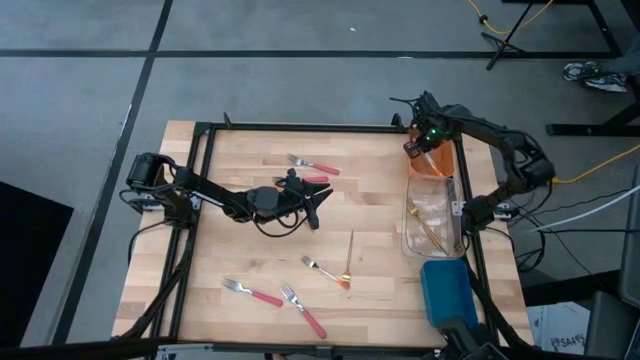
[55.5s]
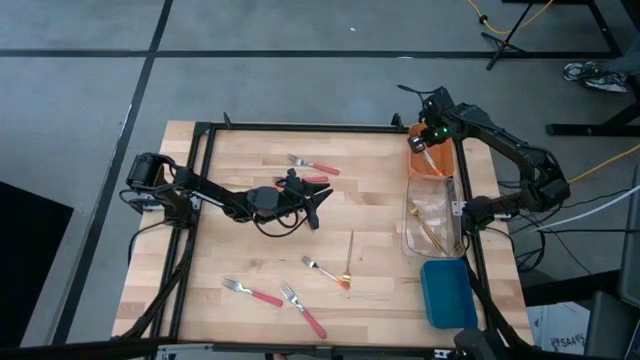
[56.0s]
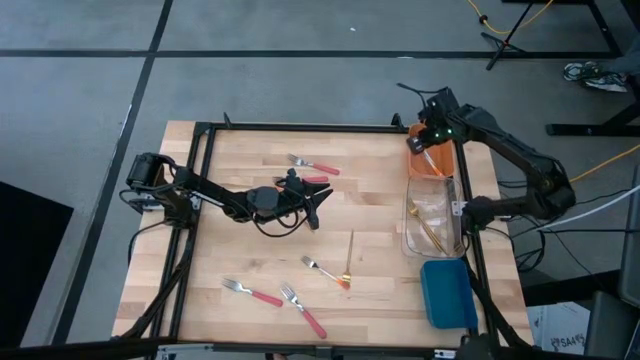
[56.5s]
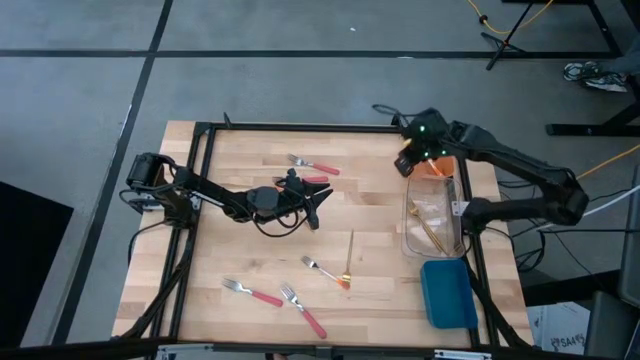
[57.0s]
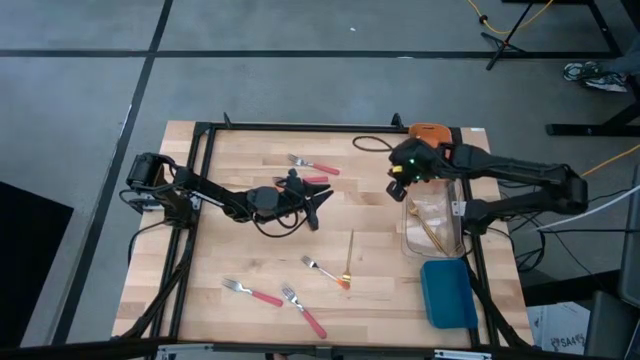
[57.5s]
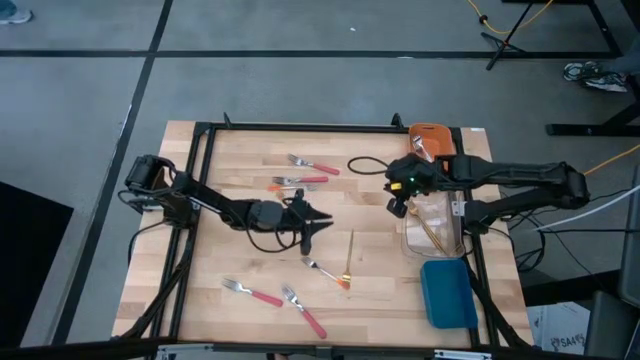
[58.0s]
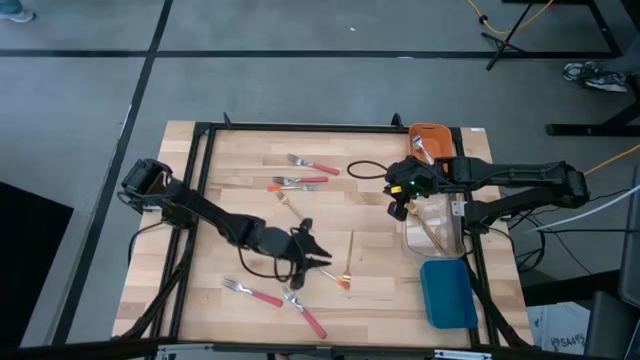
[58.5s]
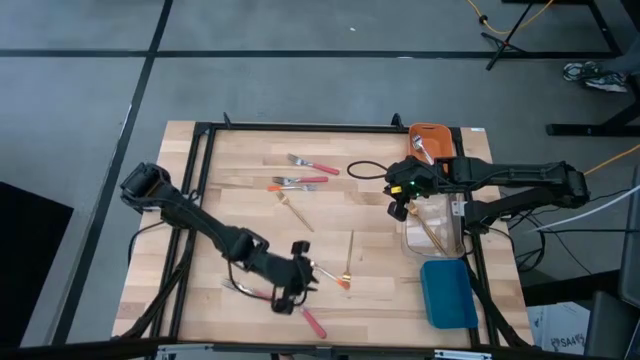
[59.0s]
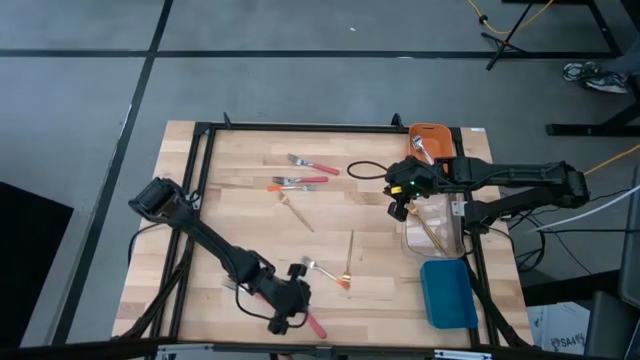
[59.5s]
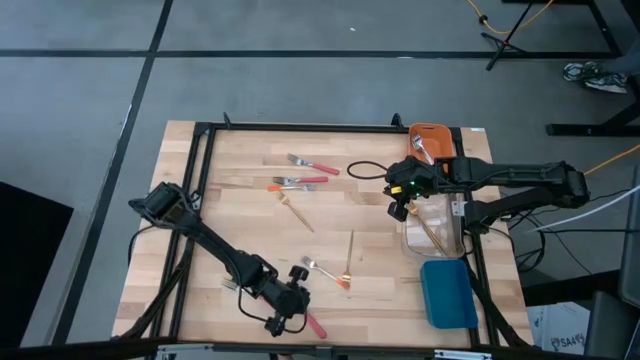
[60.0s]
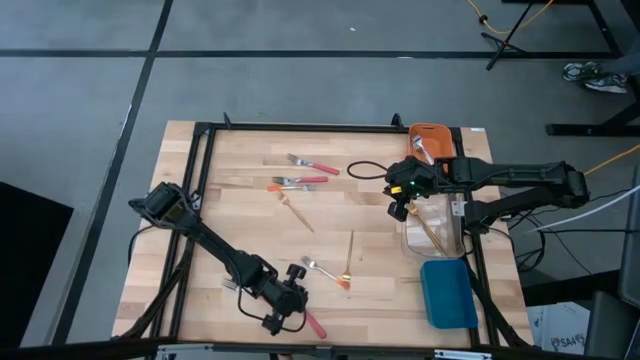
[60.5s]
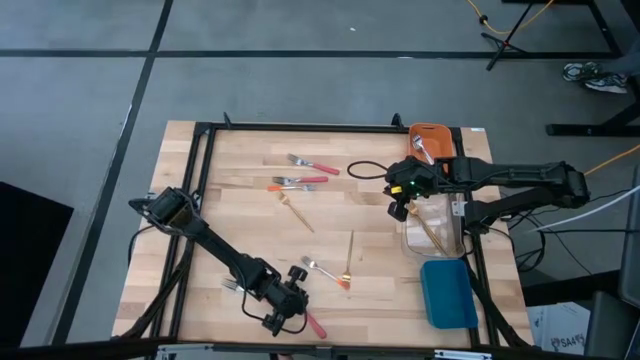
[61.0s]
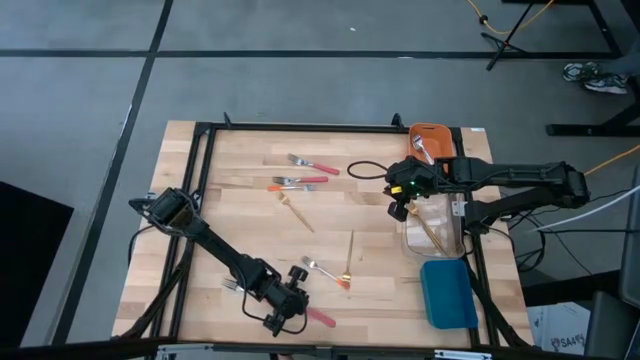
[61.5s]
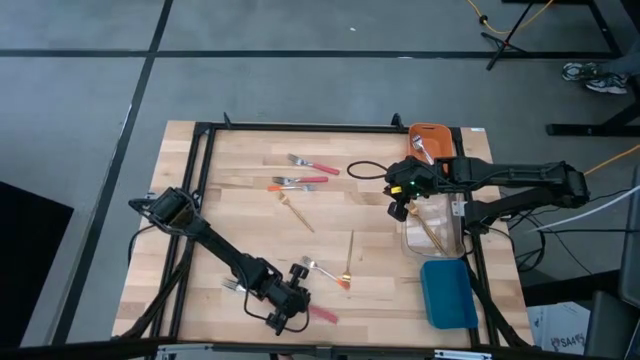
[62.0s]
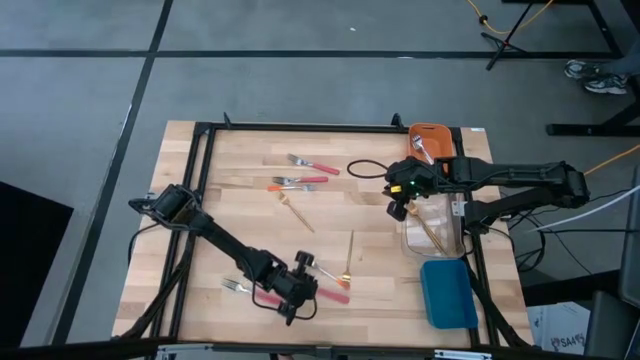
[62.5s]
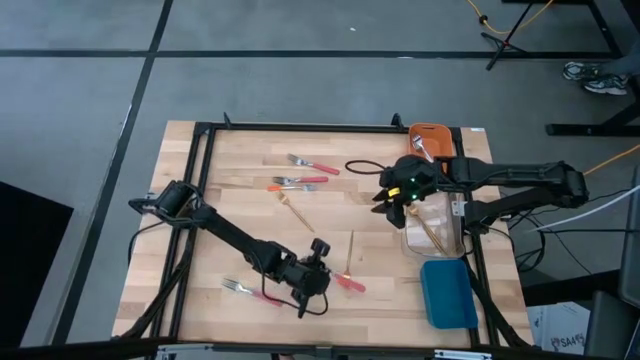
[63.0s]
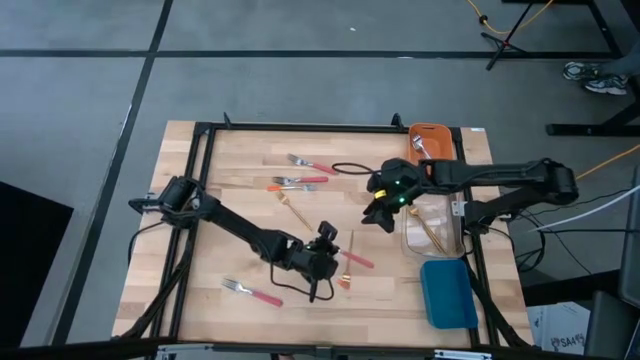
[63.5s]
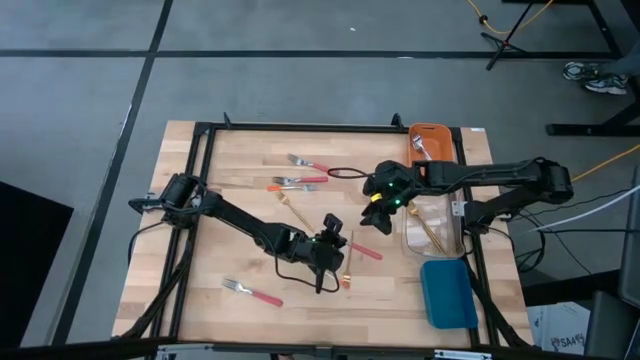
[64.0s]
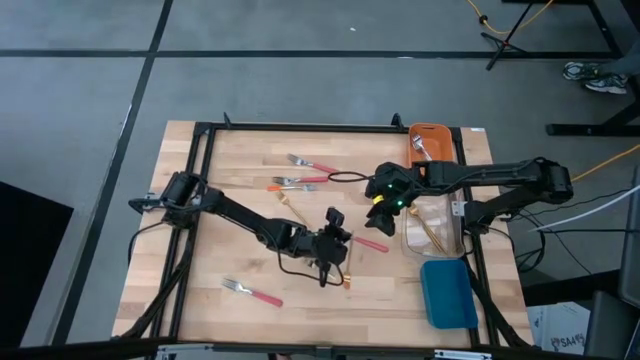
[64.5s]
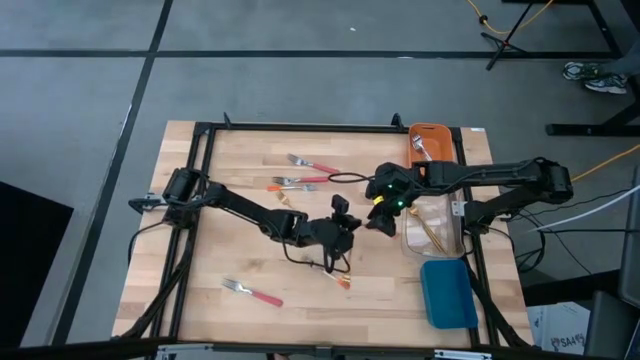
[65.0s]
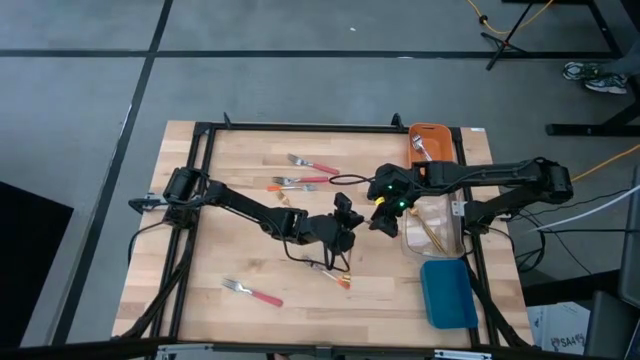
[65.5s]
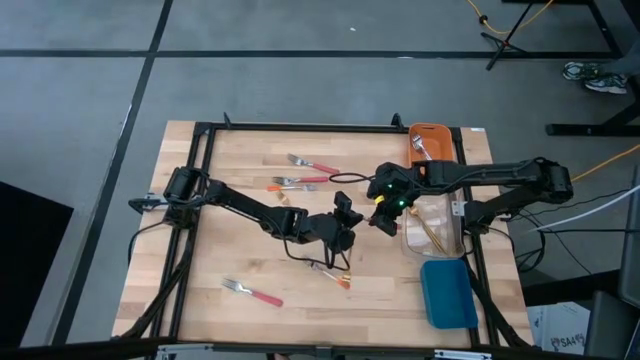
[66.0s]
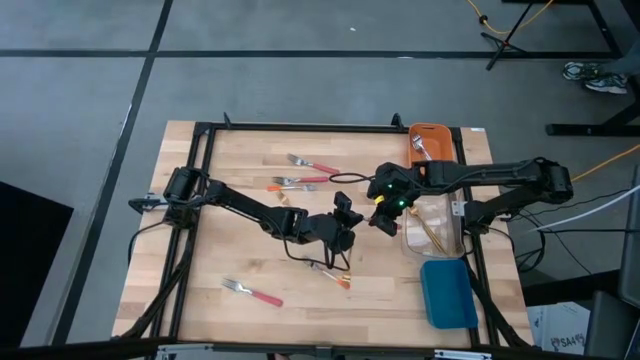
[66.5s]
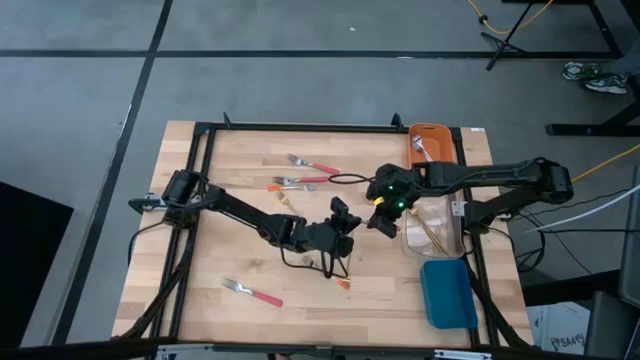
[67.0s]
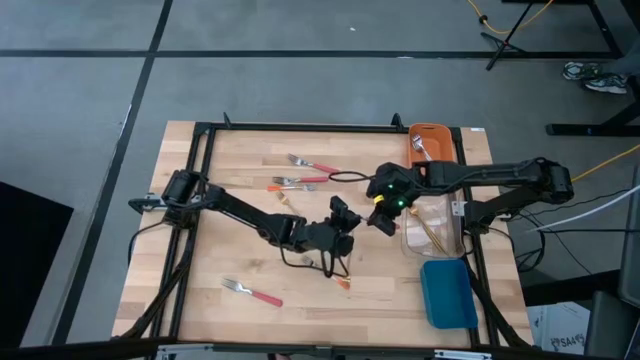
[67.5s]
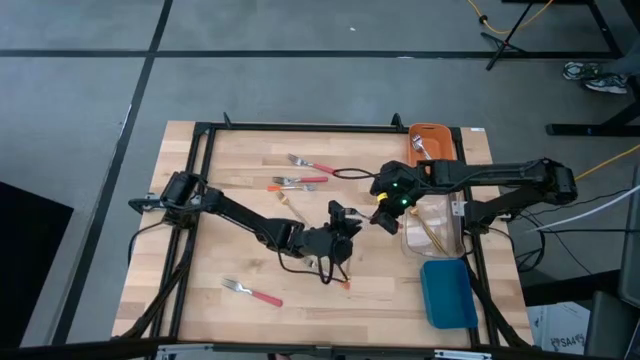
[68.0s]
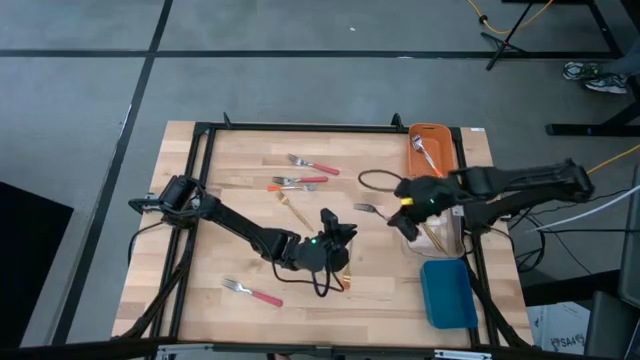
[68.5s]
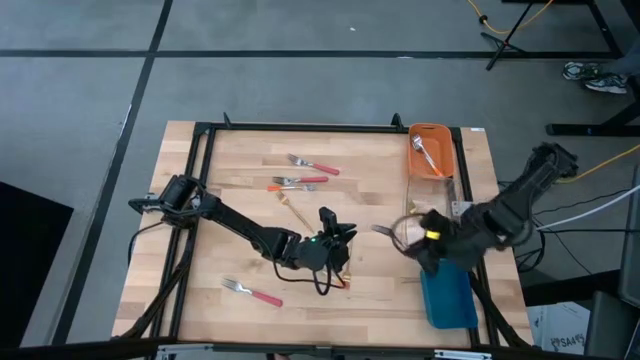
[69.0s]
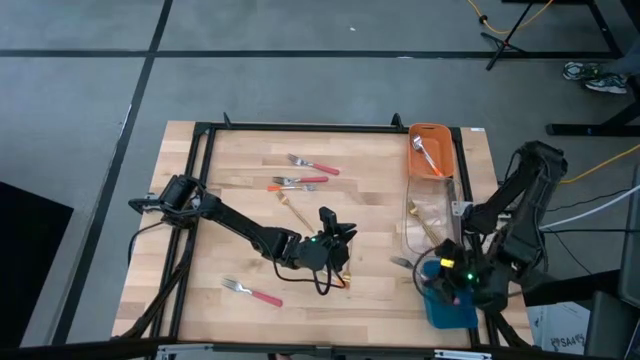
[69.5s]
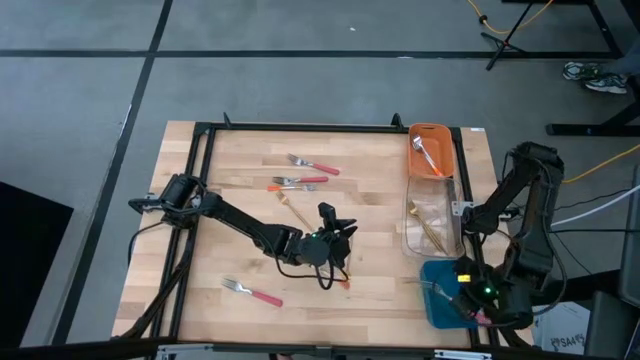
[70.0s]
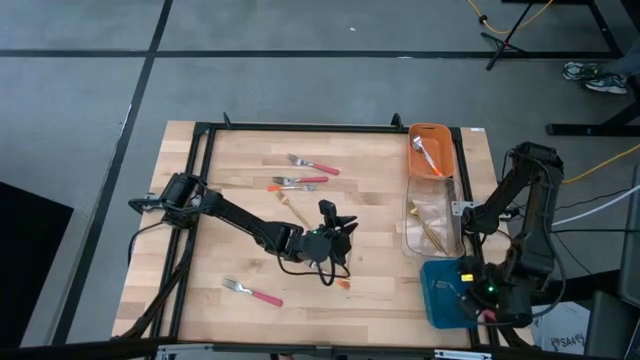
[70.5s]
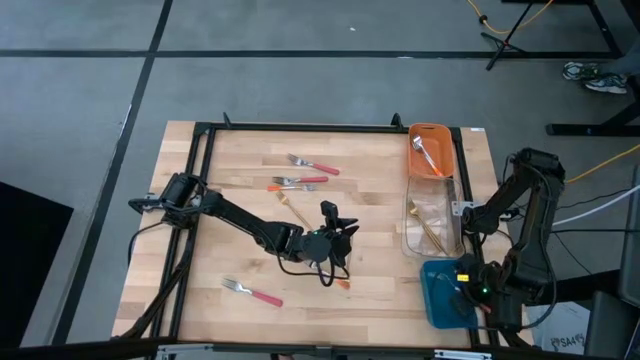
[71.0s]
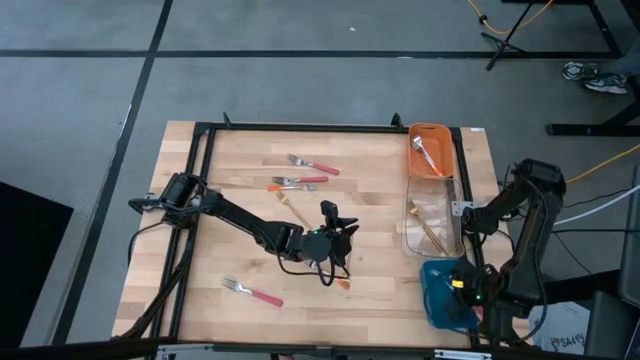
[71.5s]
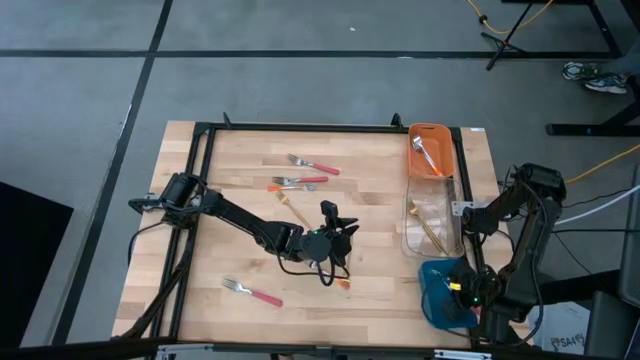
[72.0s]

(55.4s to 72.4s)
Task: Sort silverware by color (type)
Put the pink fork into the blue bin

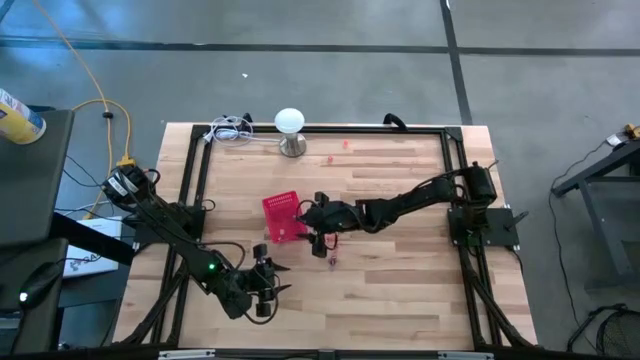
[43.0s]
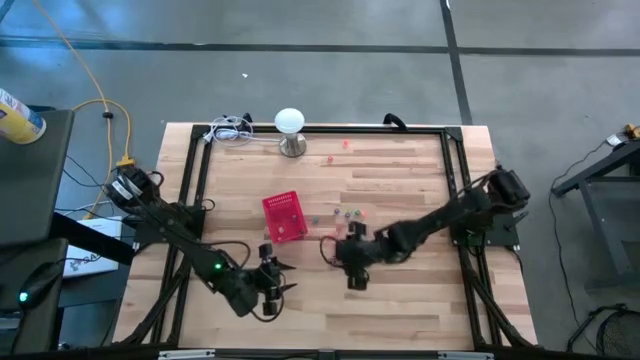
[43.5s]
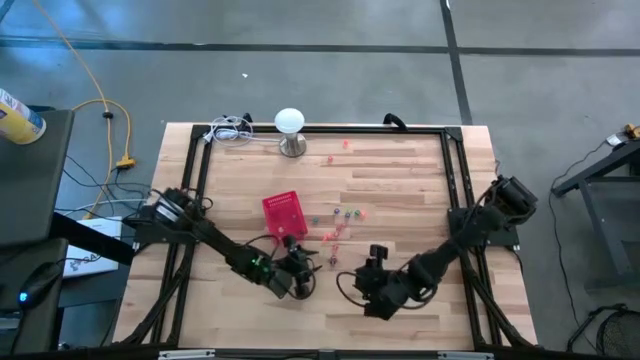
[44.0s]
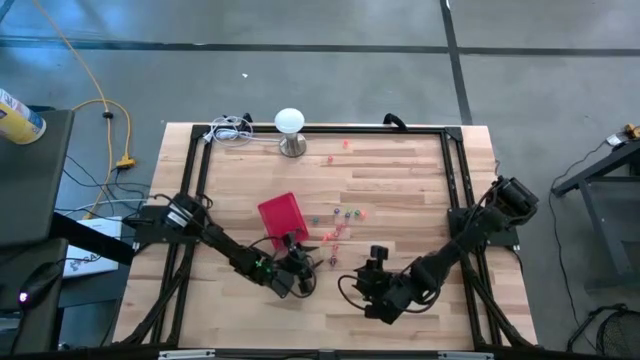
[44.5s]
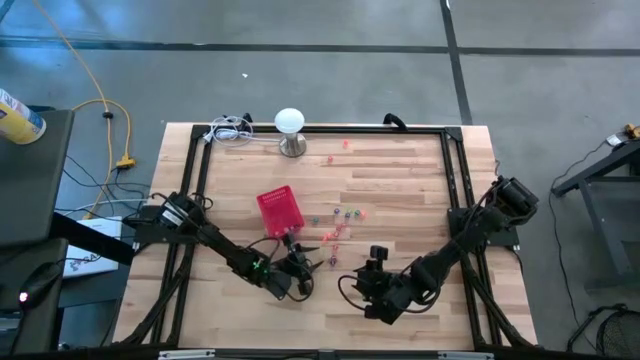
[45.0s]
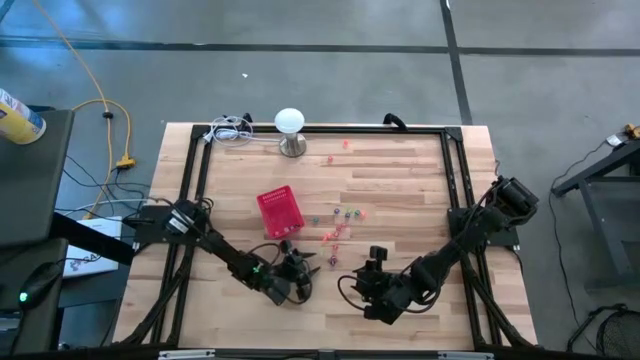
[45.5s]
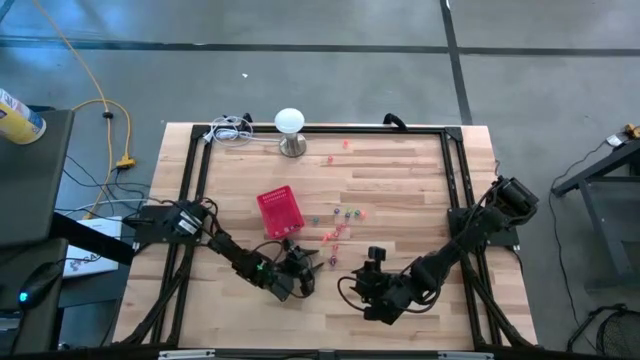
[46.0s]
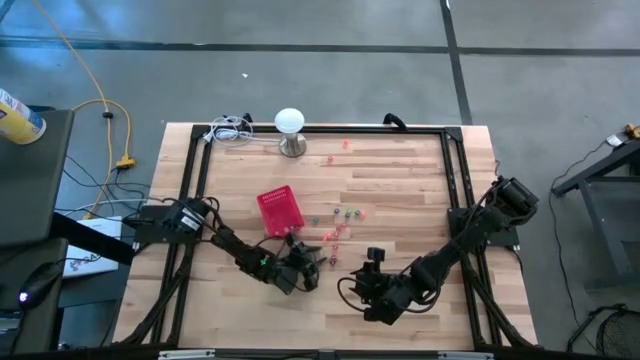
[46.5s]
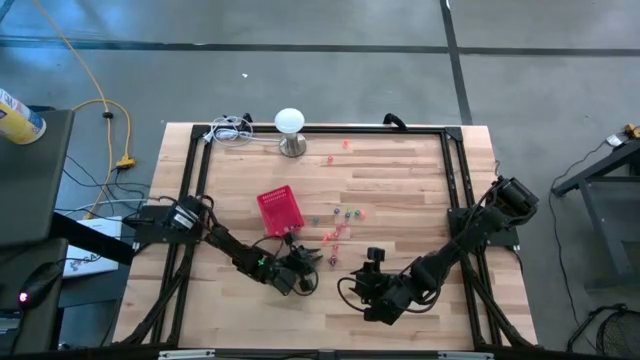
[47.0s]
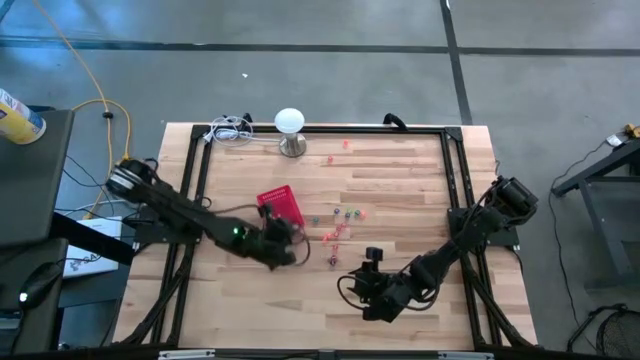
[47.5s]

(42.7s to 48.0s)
Task: Pick & Place Dice
Put the yellow die into the red basket
